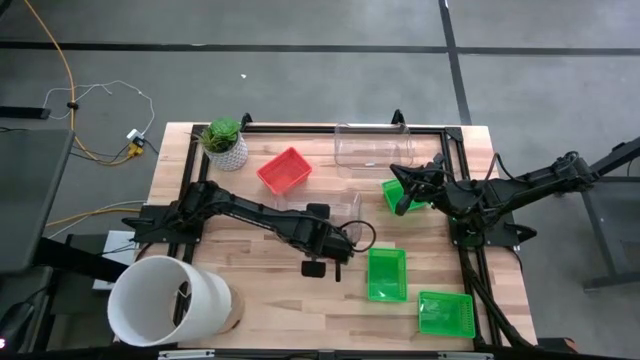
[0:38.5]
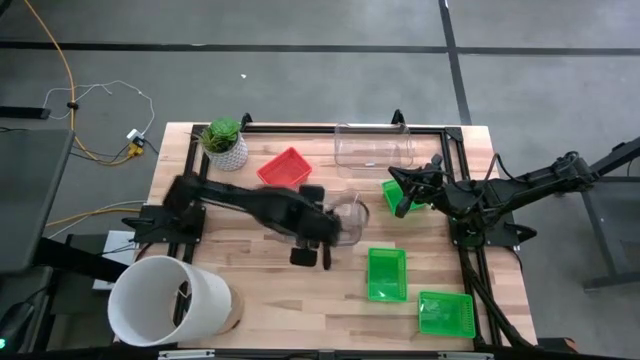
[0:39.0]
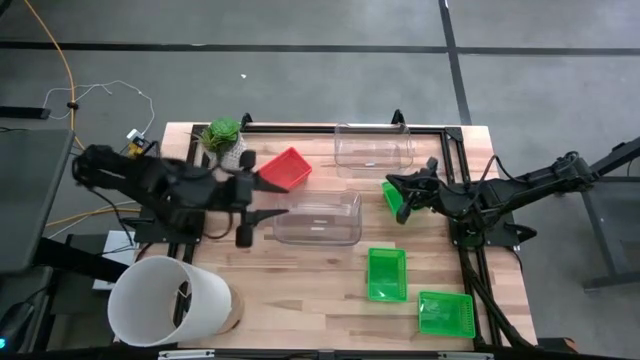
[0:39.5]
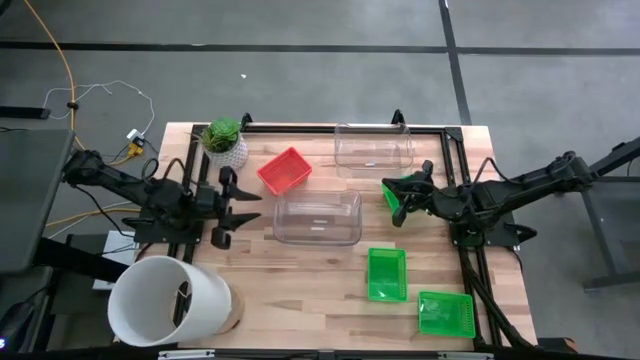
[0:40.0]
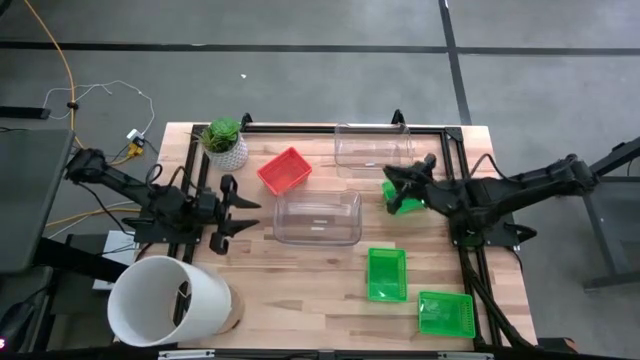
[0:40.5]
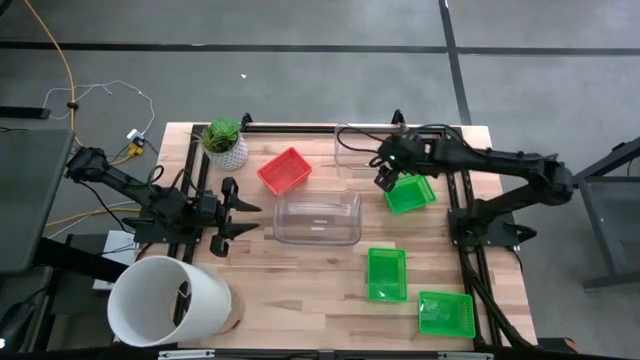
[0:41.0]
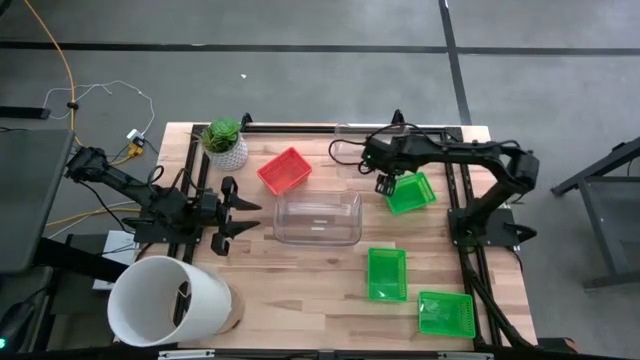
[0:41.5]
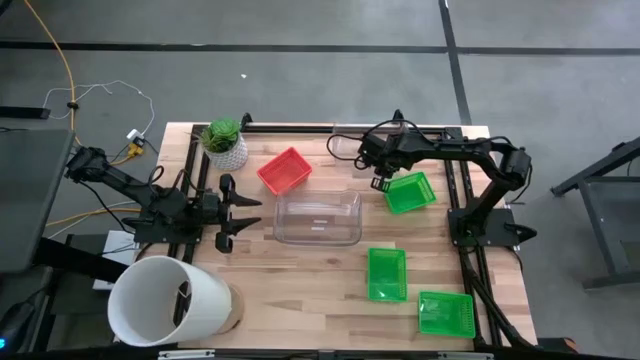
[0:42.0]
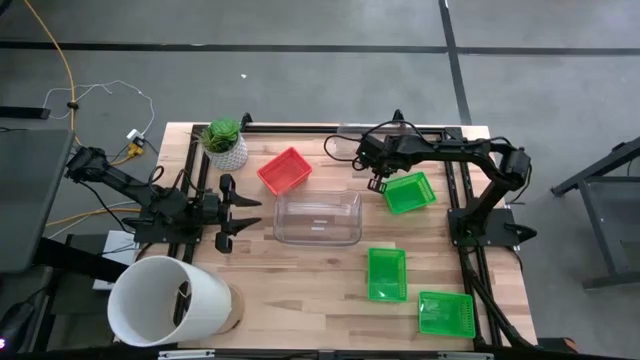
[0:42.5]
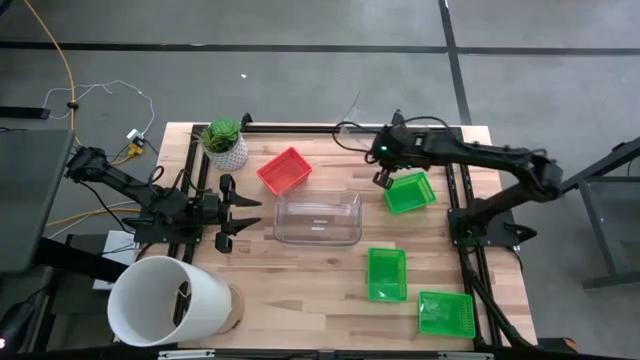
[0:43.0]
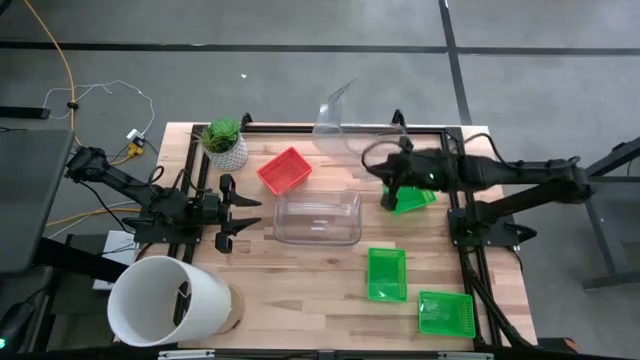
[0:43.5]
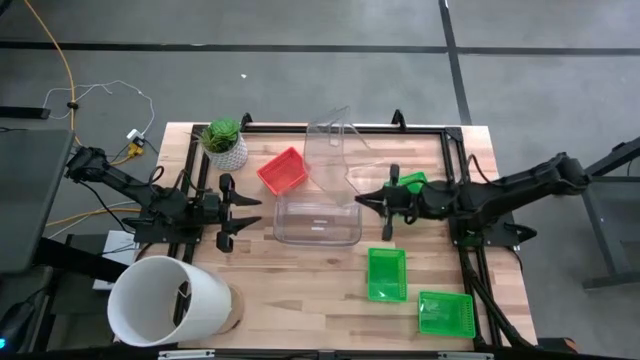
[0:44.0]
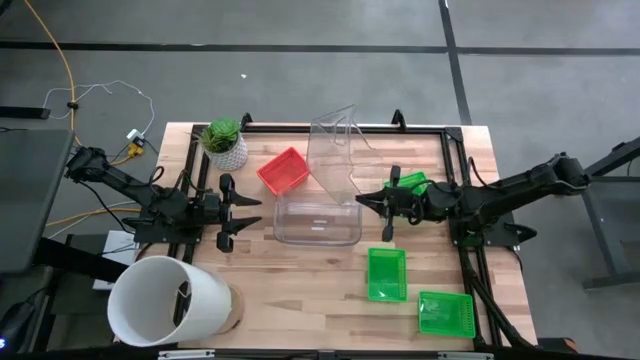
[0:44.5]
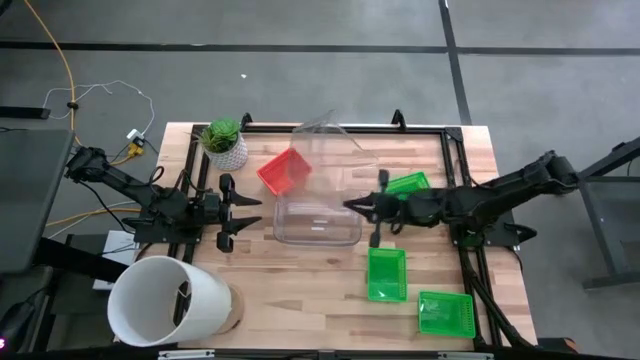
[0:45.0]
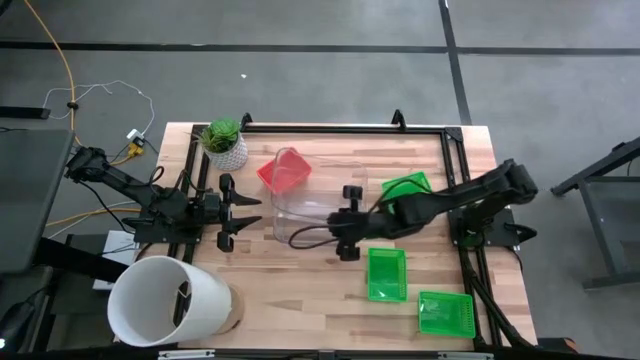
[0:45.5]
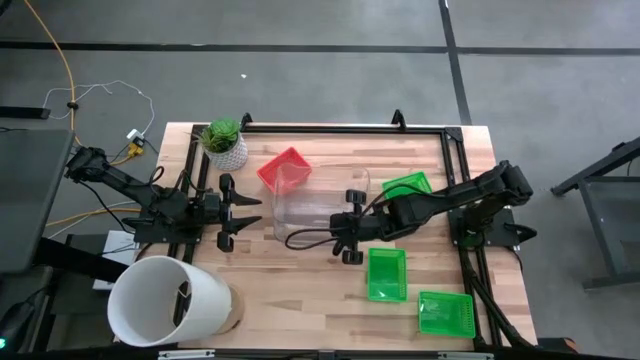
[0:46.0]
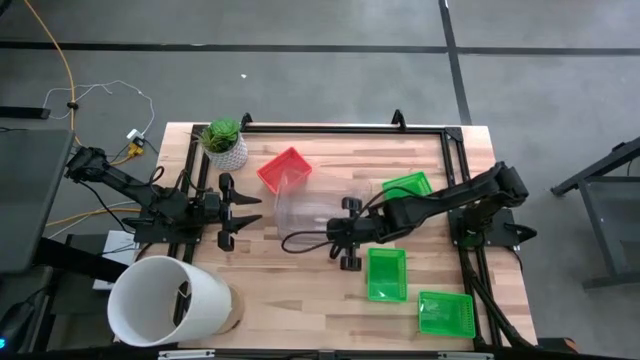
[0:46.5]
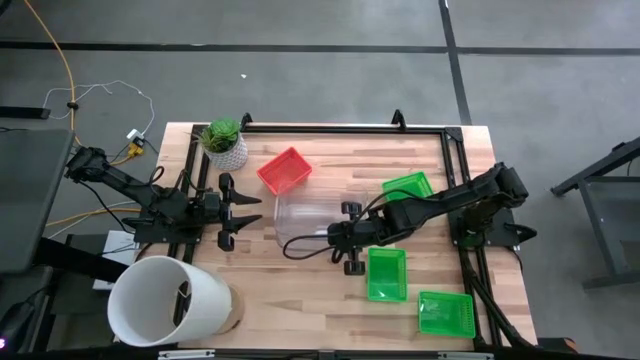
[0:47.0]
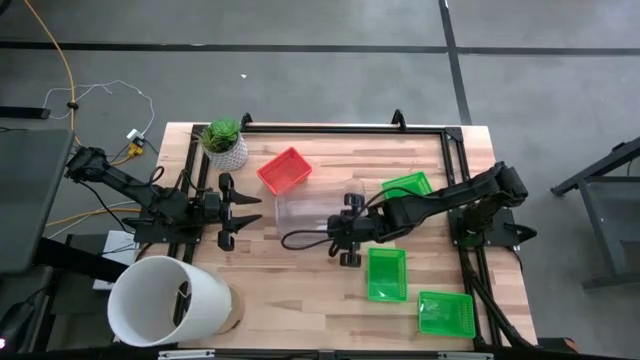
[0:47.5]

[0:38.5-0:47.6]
Stack the top transparent bin on the bottom transparent bins

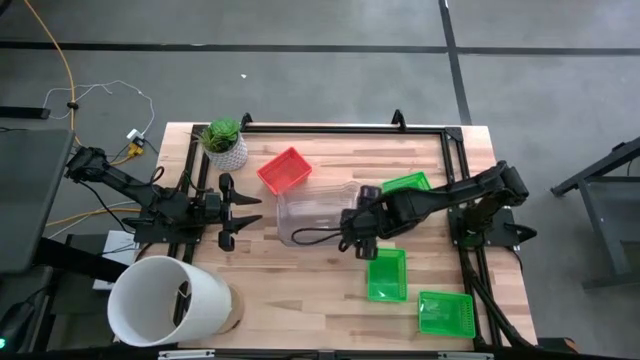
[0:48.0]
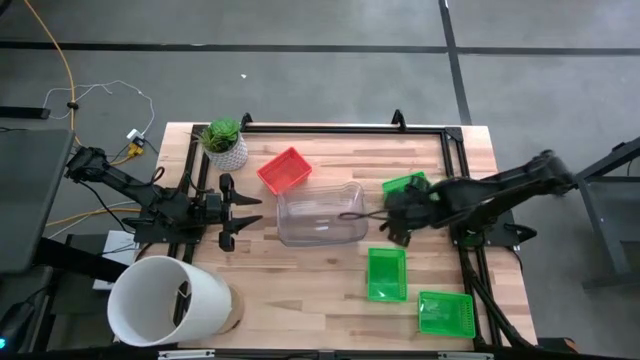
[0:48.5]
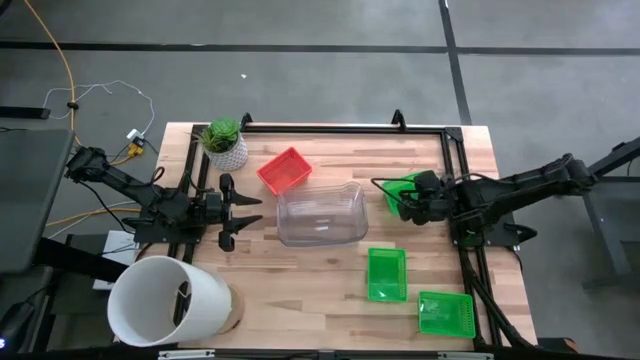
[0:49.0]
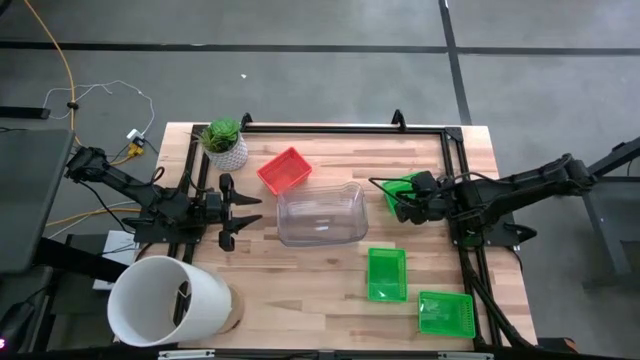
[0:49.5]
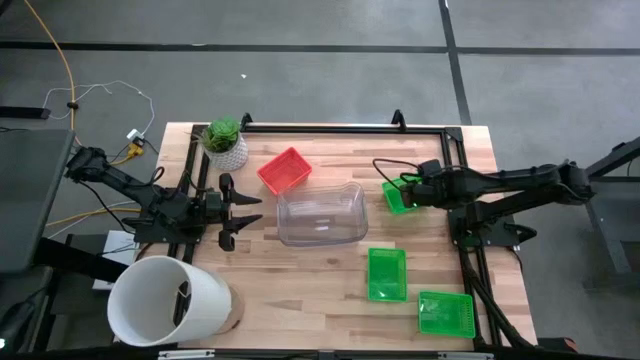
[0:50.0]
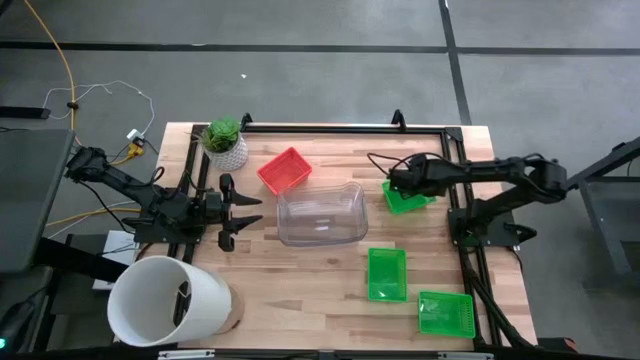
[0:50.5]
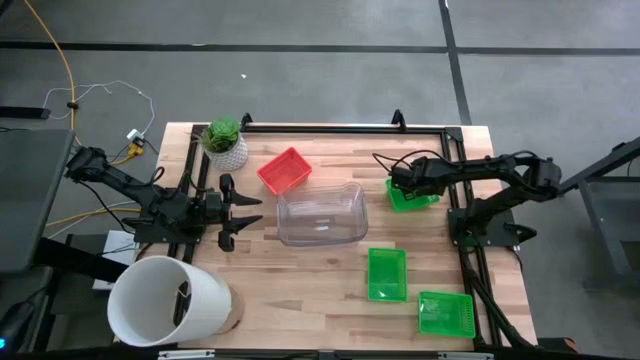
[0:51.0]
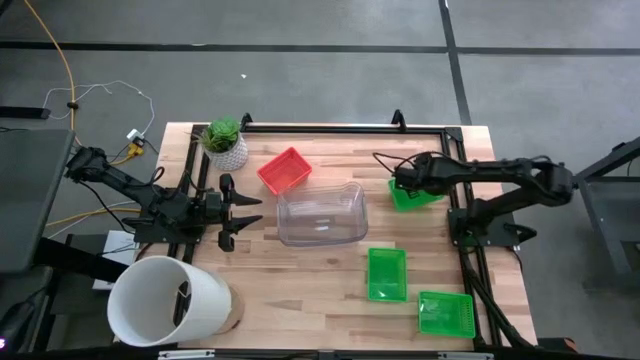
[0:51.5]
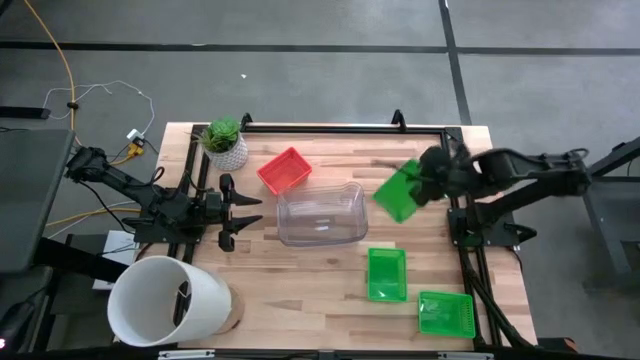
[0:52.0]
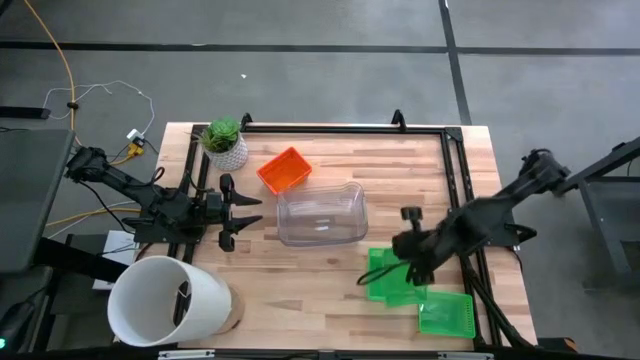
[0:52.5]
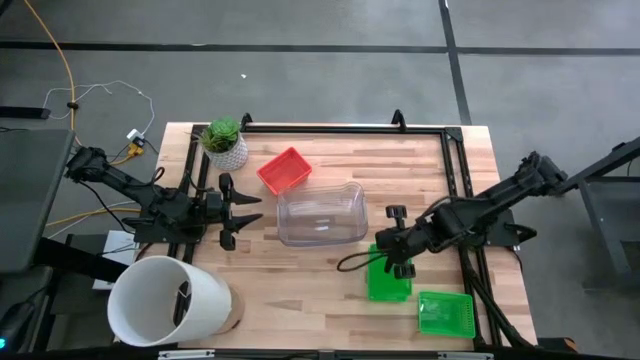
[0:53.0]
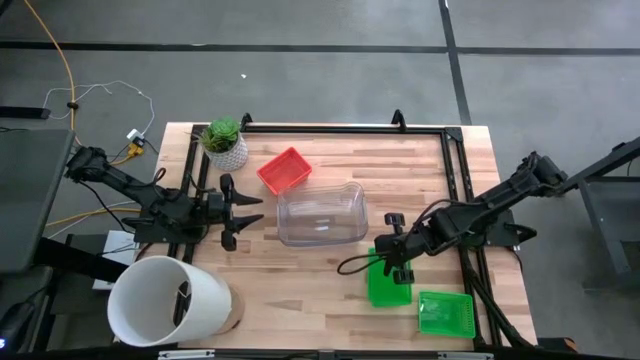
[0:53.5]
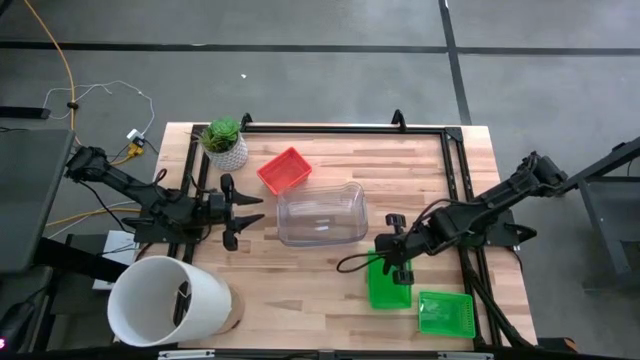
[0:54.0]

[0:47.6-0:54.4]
Stack the top green bin on the middle green bin

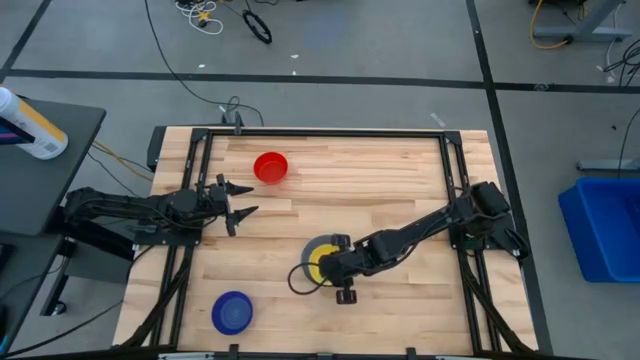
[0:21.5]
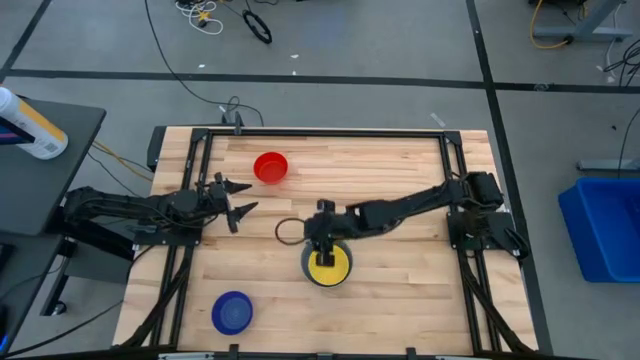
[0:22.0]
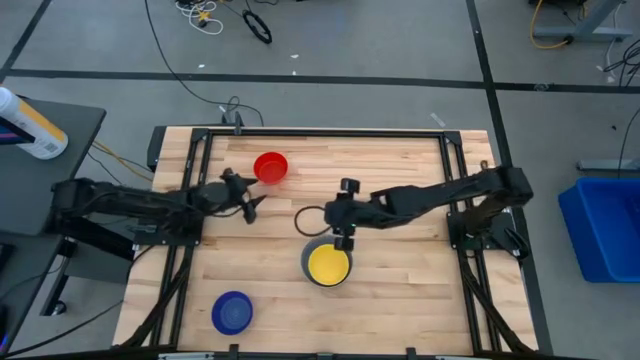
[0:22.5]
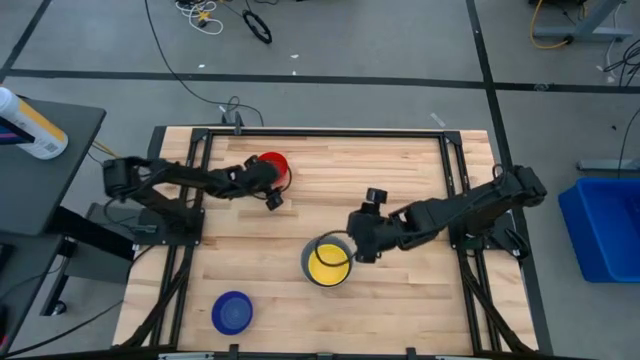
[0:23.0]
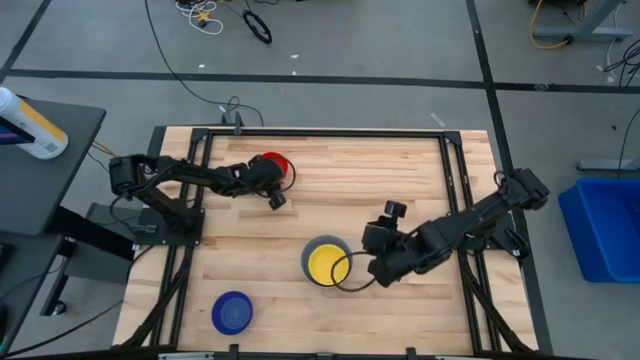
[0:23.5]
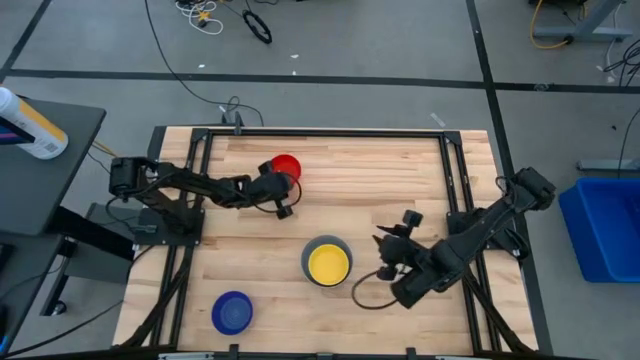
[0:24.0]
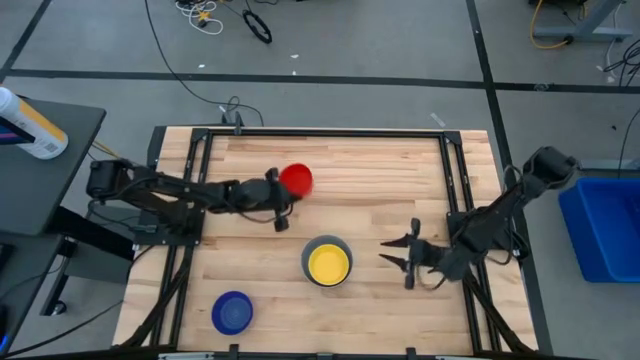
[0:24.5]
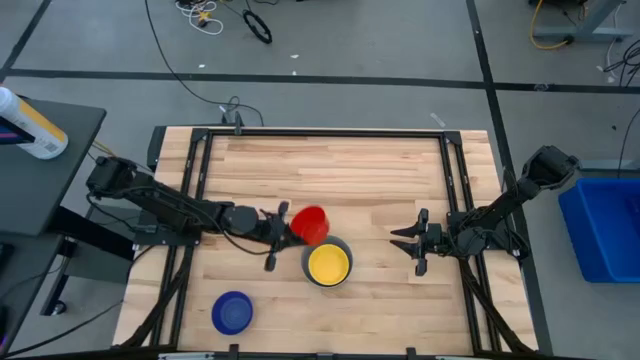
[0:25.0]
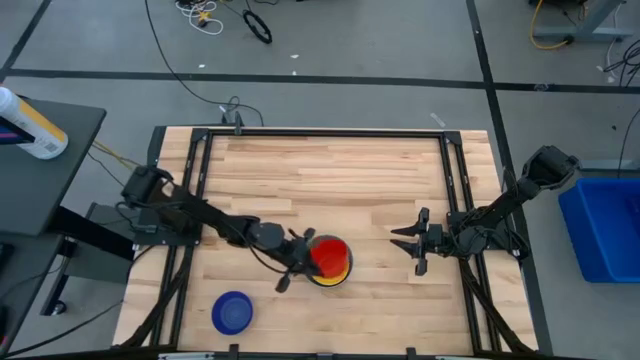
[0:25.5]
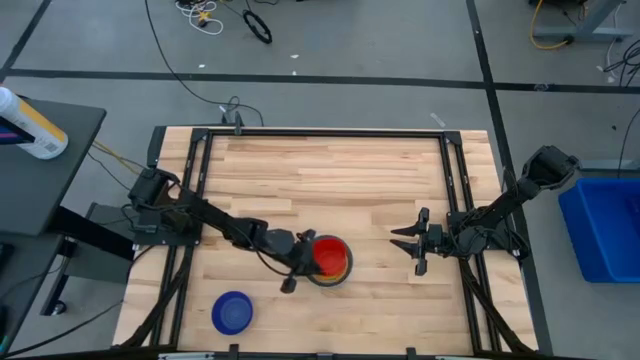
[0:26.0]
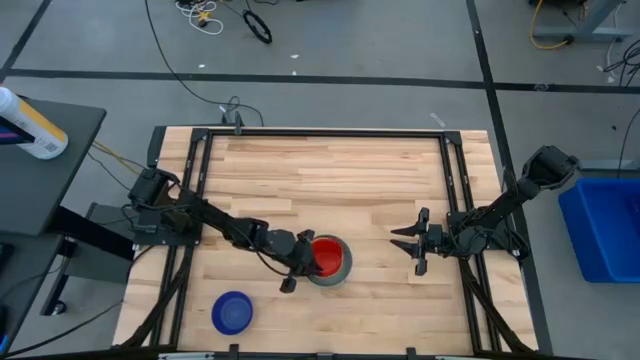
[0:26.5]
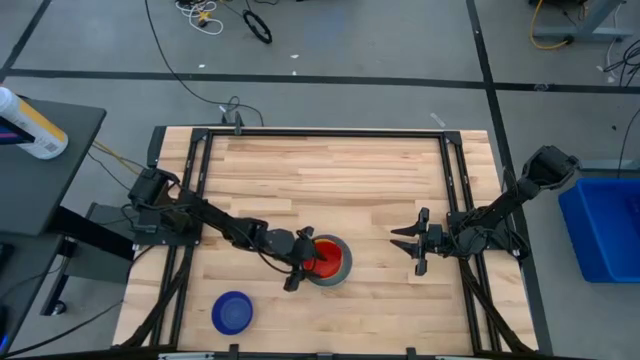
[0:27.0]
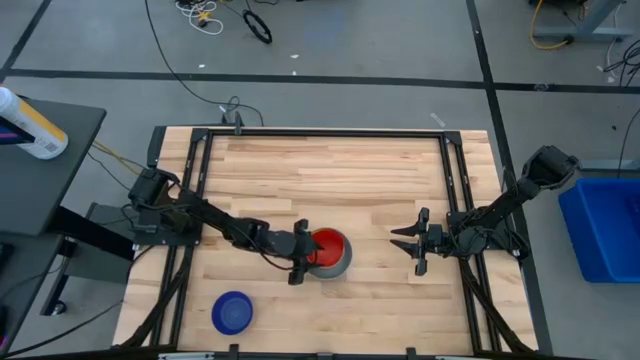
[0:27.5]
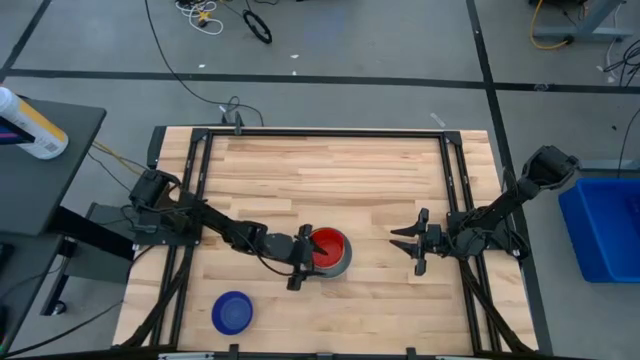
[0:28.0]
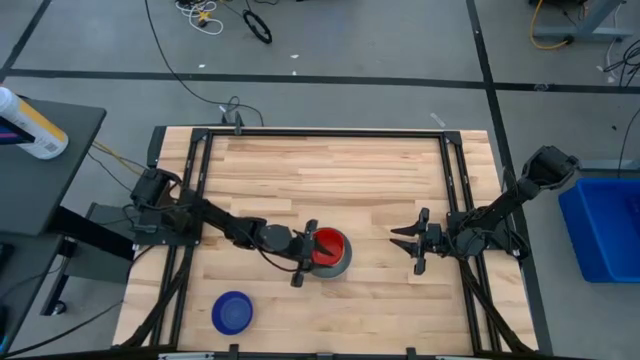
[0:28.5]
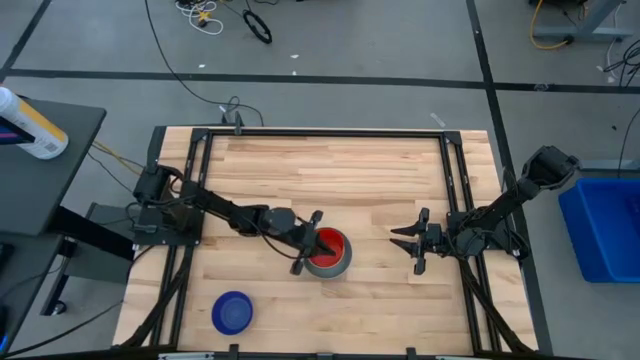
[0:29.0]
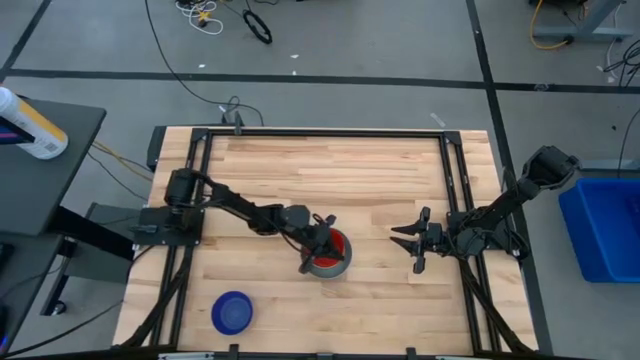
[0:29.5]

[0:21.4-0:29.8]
Stack the red bowl on top of the yellow bowl
